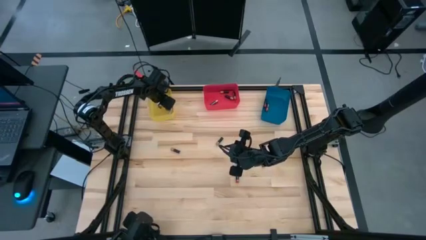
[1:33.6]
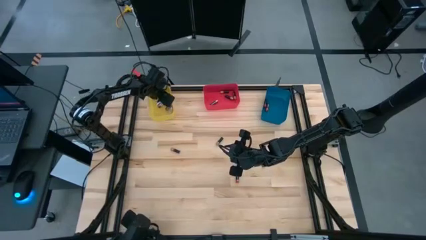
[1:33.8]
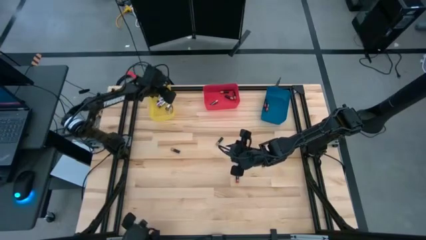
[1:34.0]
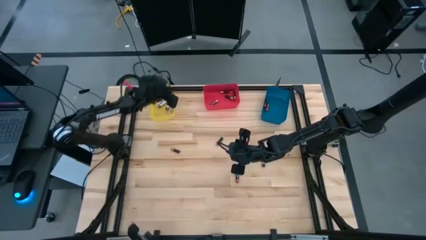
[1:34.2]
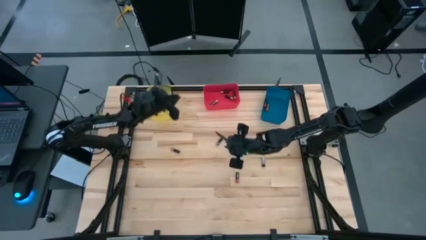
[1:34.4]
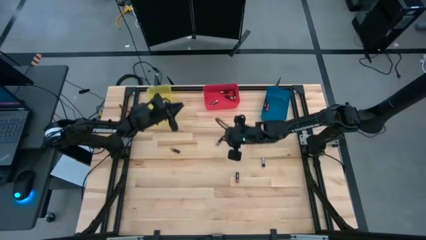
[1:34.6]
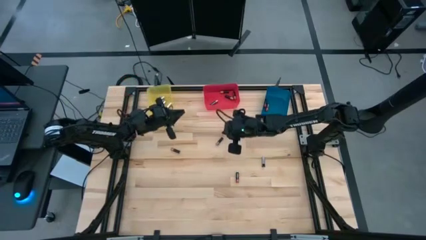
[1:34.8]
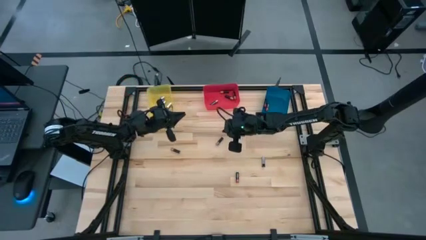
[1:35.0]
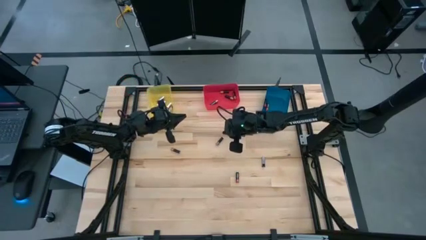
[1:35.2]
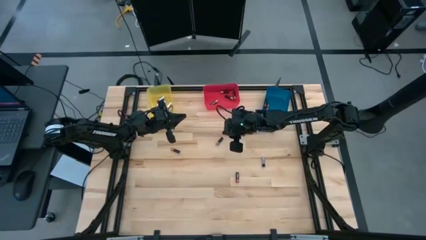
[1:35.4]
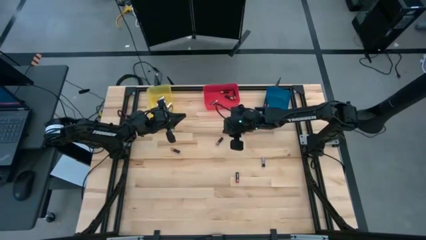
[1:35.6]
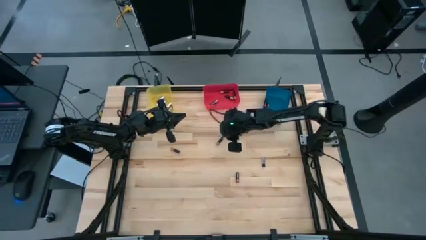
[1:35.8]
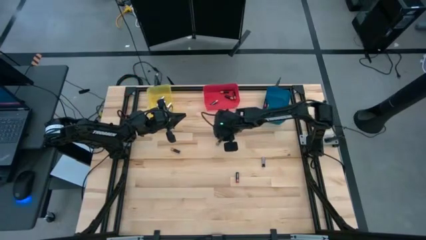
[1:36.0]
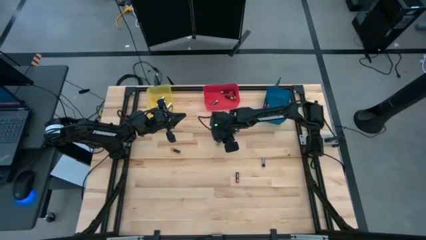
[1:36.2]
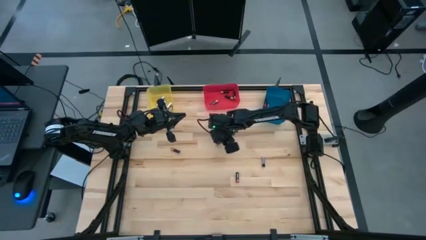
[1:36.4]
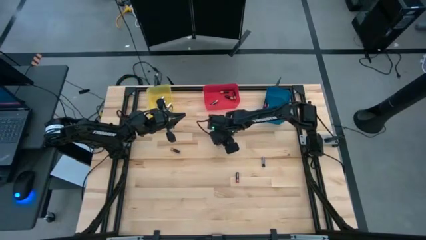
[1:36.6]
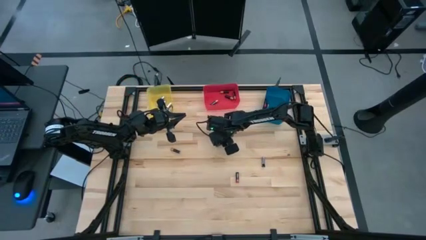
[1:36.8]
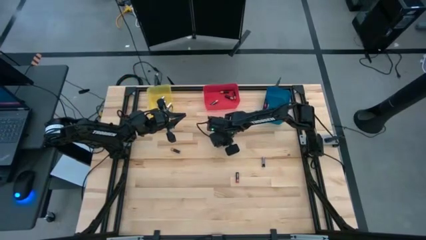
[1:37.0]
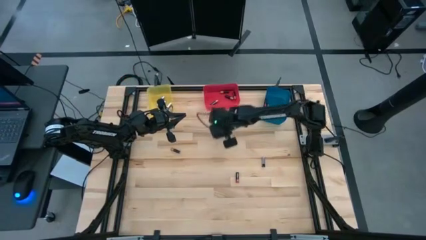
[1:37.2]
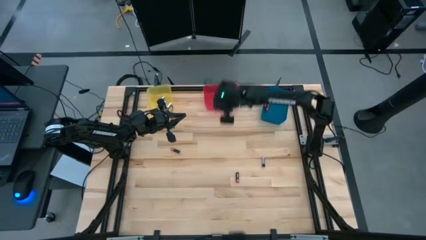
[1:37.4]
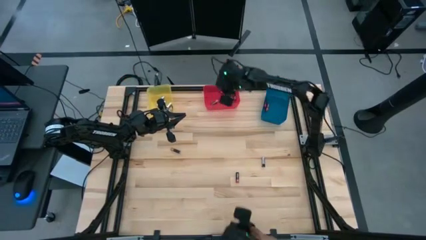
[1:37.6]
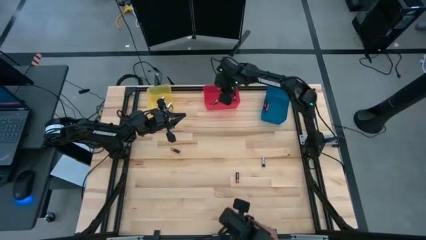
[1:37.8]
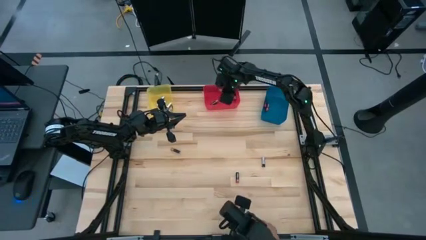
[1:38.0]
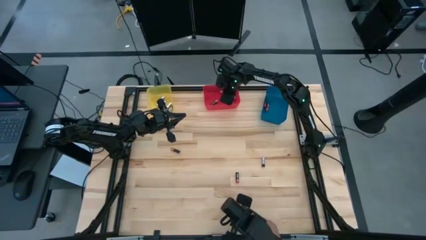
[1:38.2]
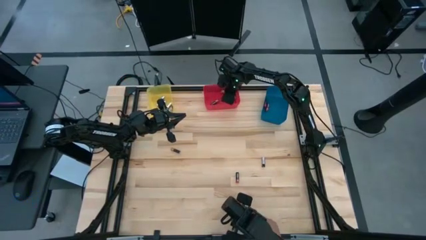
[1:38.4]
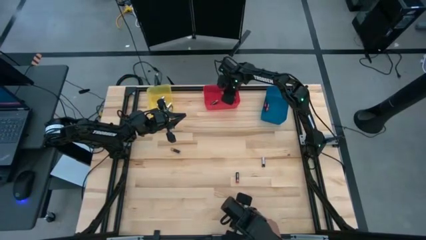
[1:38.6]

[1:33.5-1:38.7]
Task: Sort batteries
Put the brown battery into the red bin

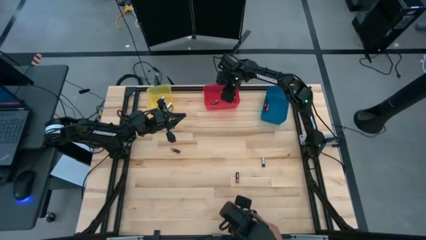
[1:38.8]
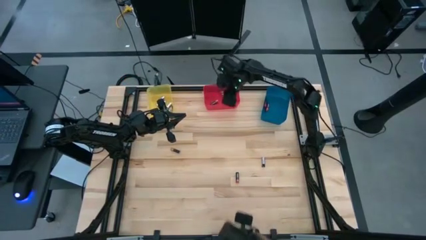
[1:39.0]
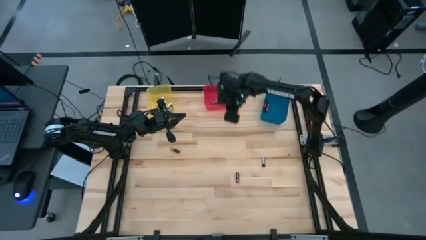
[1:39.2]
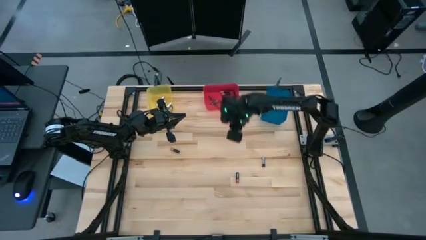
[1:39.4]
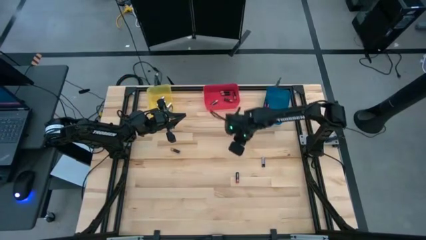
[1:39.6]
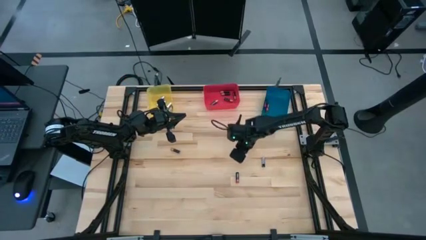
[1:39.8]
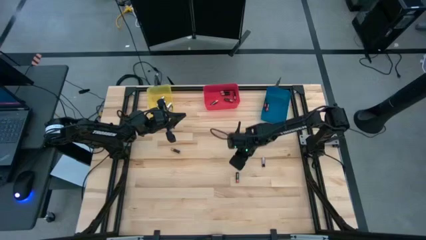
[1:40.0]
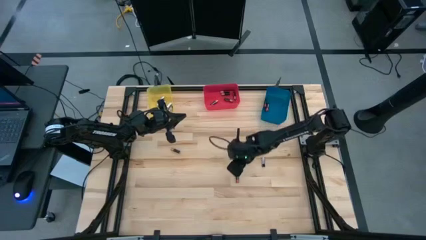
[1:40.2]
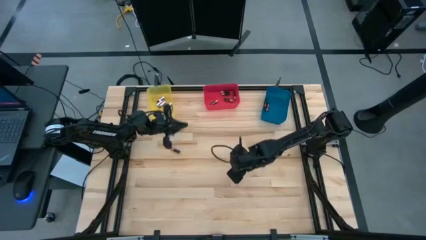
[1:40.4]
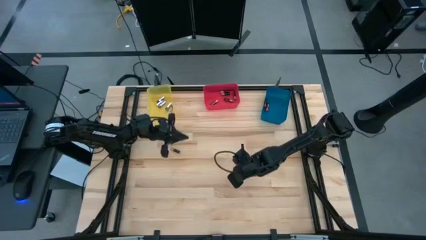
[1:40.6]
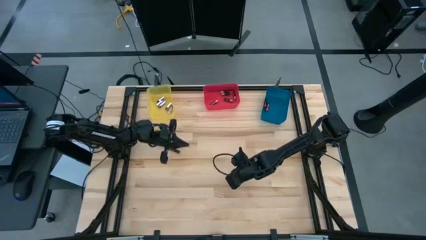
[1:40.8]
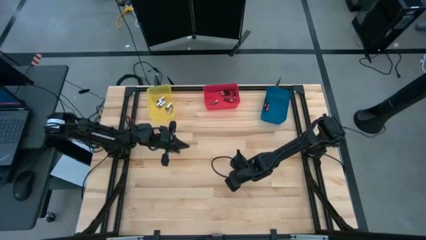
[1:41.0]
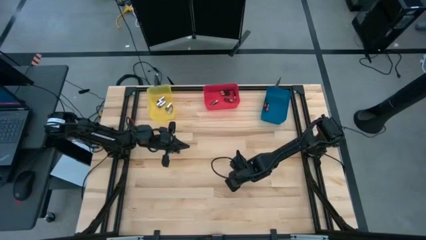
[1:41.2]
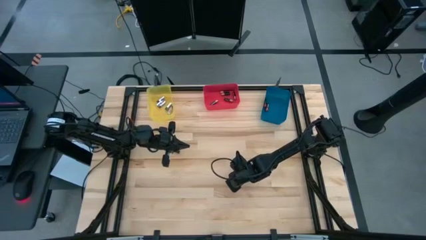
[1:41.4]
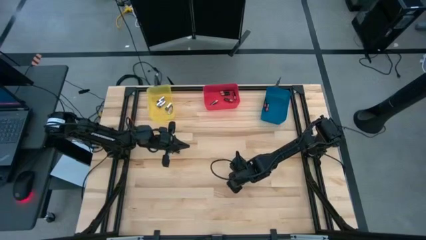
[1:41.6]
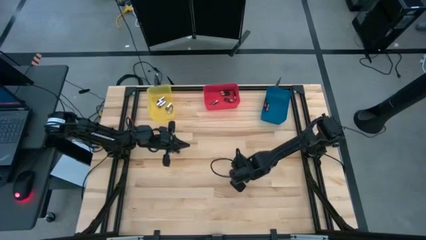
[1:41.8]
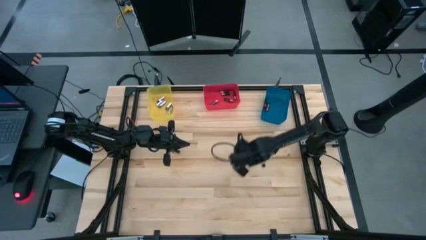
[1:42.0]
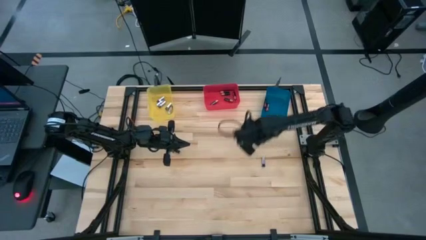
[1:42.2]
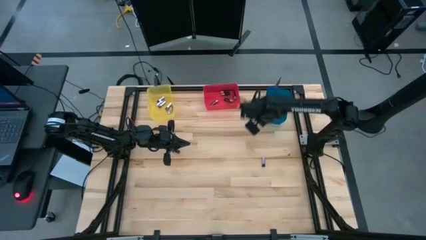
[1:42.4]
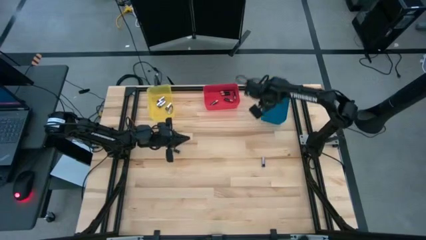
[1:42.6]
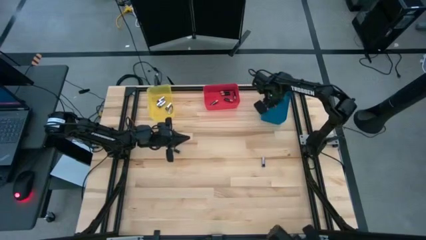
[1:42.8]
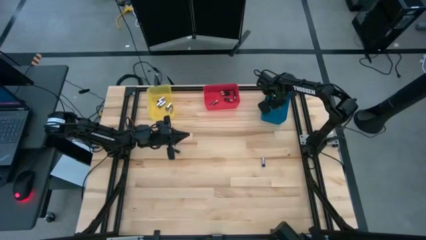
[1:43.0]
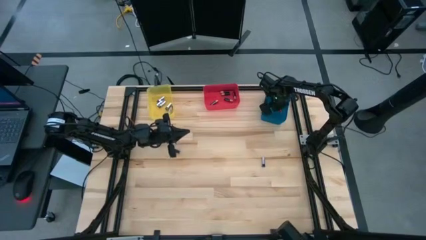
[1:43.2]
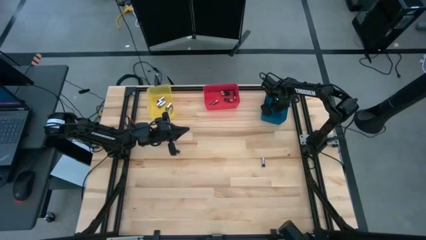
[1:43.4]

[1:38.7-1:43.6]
Put the red battery into the blue bin

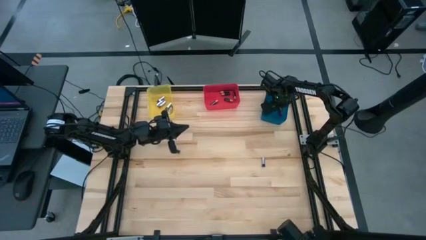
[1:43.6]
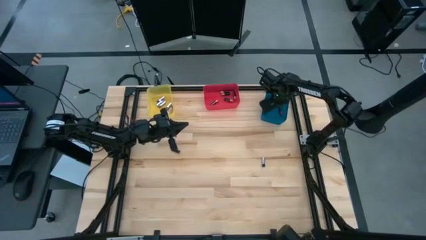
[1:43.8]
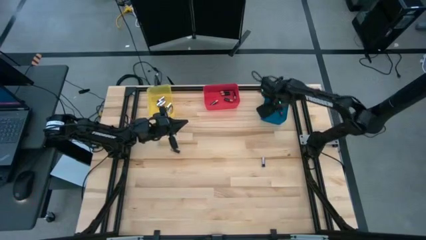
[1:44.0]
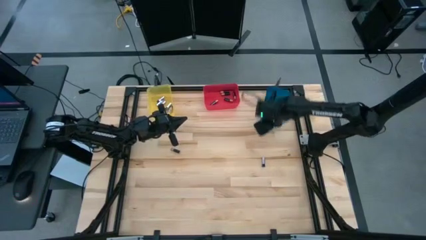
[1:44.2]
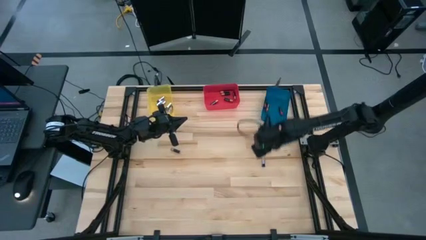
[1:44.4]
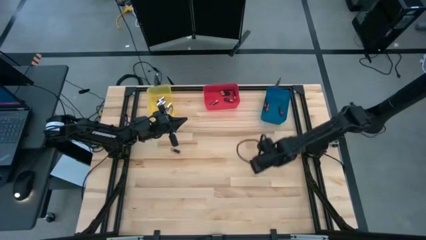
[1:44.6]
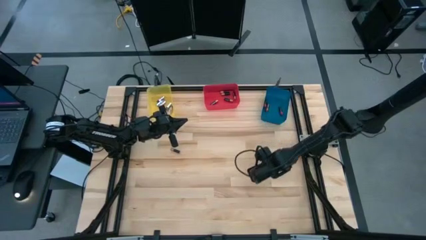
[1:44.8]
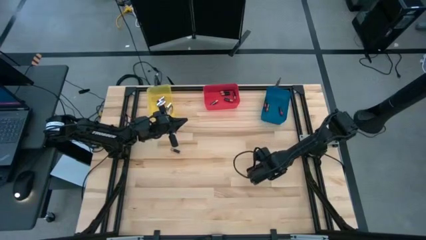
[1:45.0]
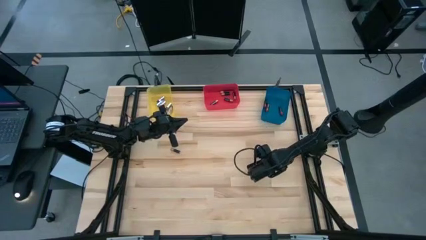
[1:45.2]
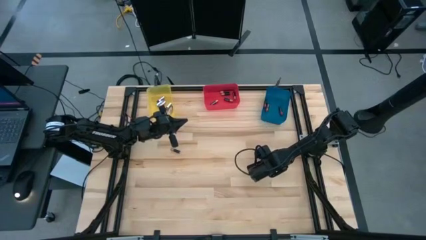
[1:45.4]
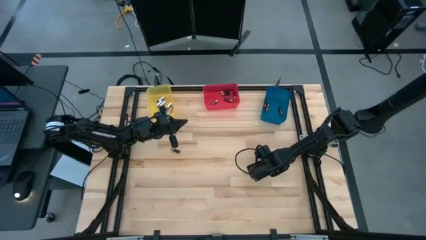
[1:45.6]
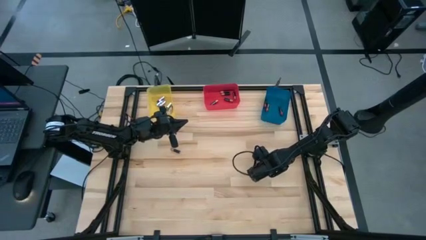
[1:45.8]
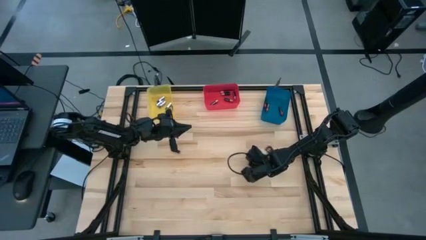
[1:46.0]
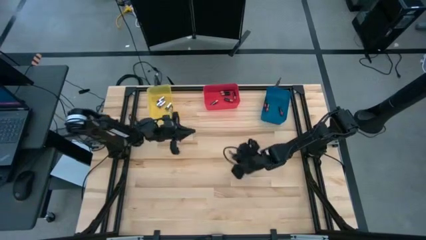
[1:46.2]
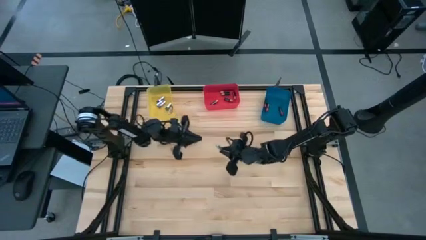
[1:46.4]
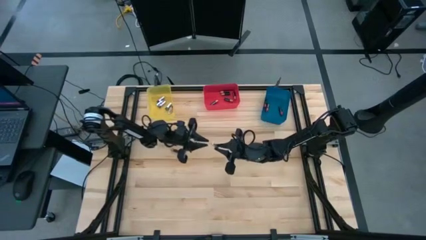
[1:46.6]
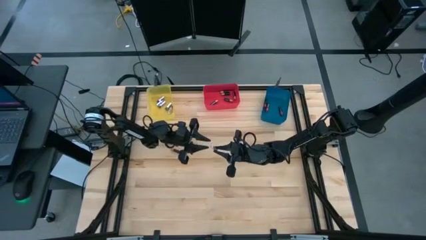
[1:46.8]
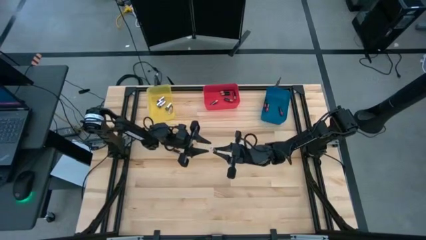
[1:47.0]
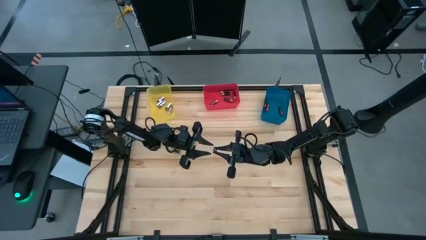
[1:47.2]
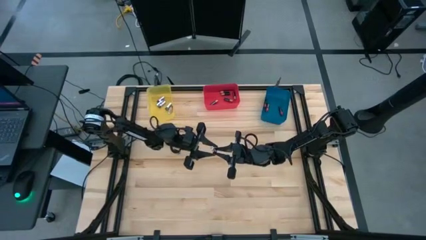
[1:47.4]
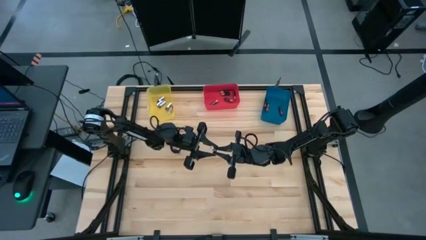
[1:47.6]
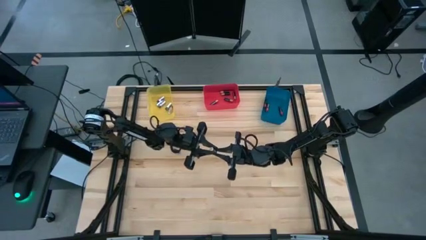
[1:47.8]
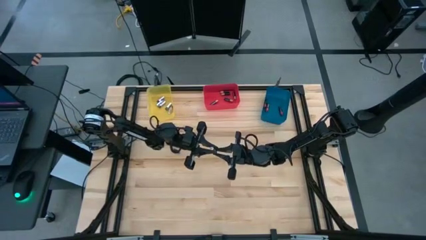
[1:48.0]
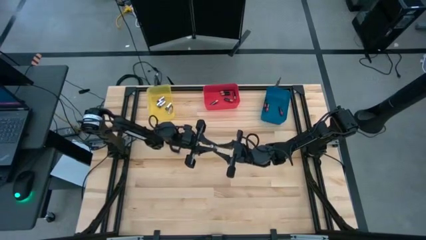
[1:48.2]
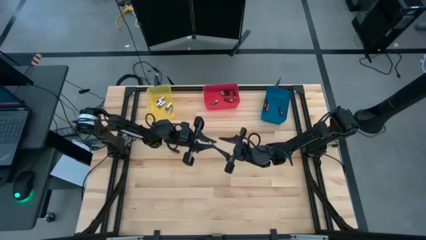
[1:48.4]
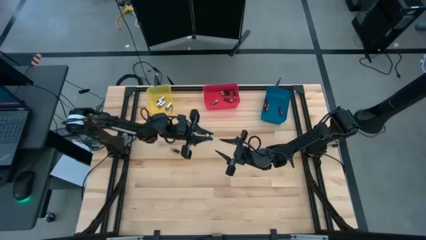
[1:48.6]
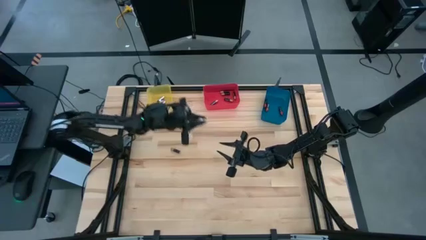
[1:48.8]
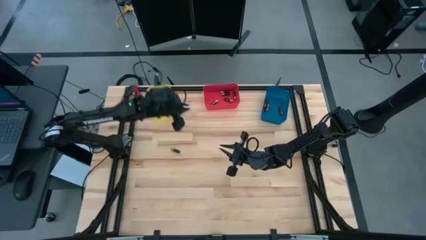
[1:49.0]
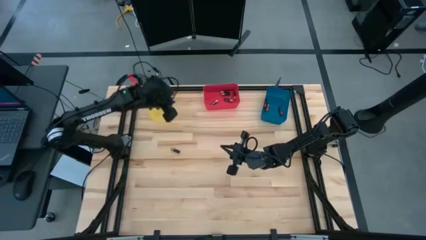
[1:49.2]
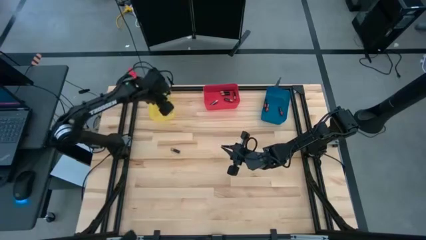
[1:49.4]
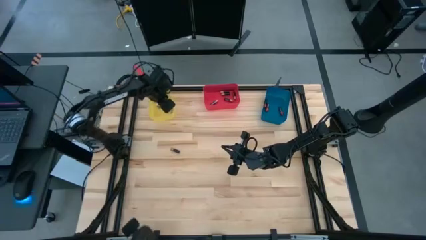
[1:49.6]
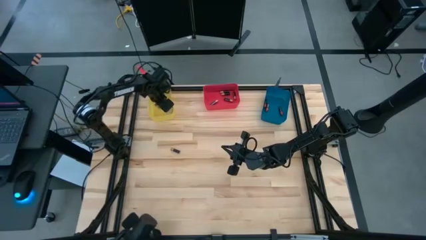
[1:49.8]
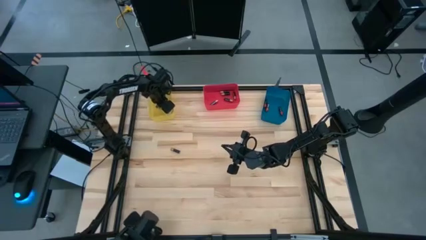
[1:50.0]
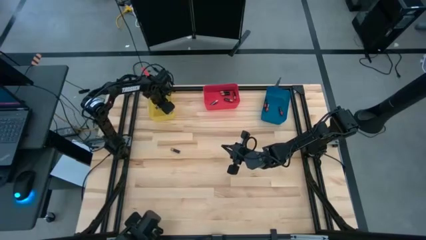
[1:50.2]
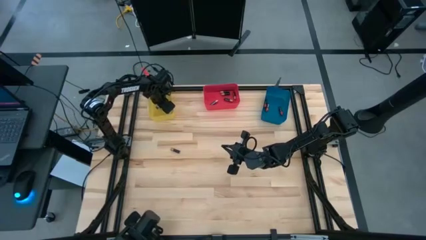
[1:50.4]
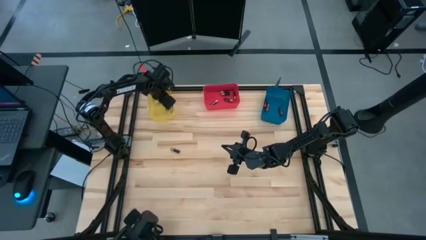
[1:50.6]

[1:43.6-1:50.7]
Put the silver battery into the yellow bin
